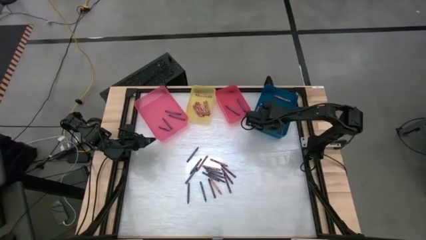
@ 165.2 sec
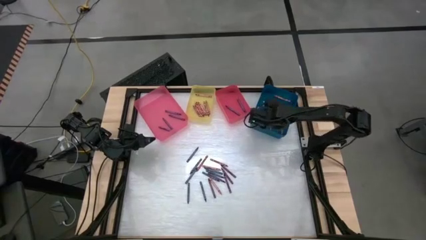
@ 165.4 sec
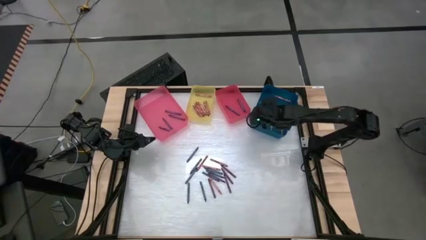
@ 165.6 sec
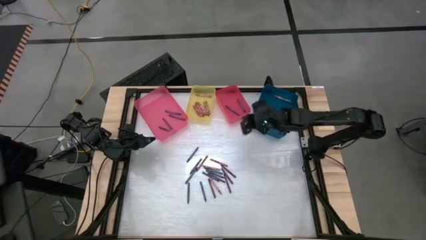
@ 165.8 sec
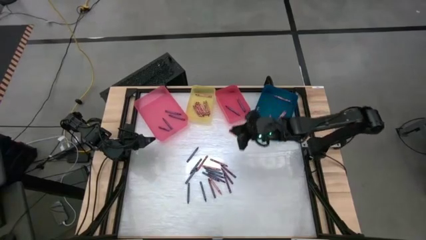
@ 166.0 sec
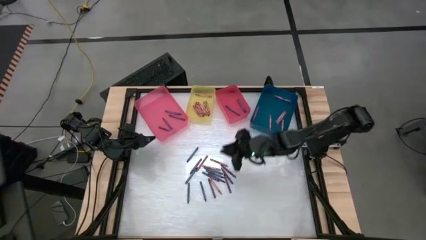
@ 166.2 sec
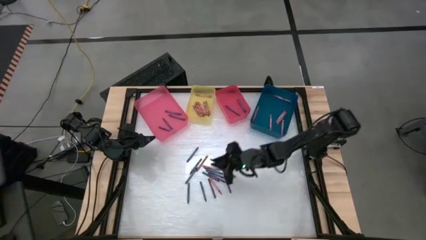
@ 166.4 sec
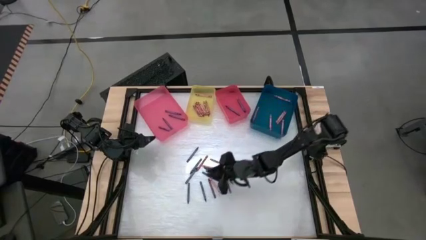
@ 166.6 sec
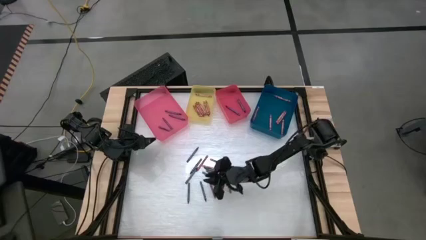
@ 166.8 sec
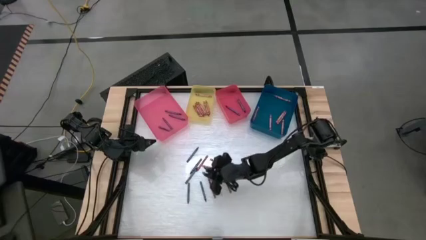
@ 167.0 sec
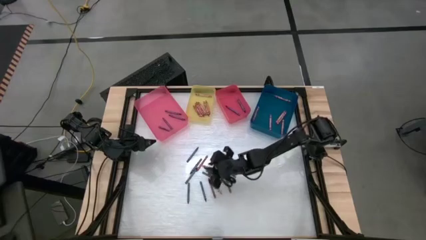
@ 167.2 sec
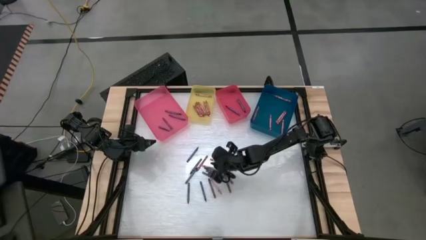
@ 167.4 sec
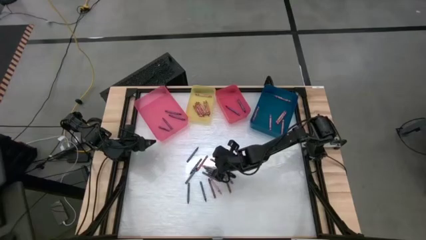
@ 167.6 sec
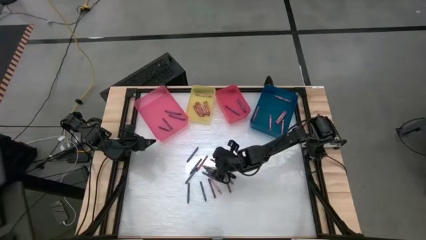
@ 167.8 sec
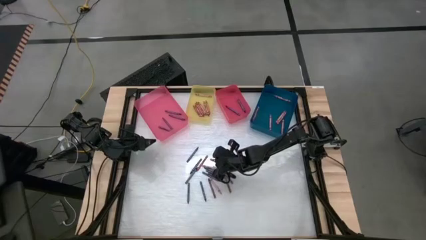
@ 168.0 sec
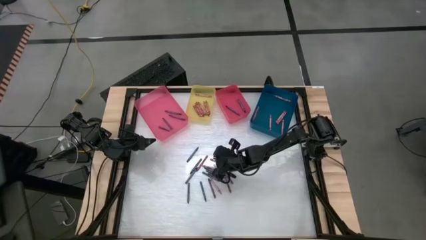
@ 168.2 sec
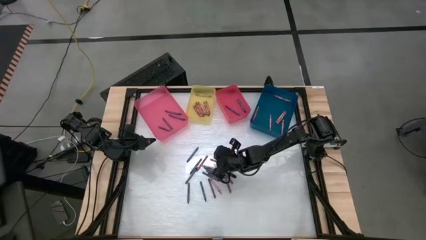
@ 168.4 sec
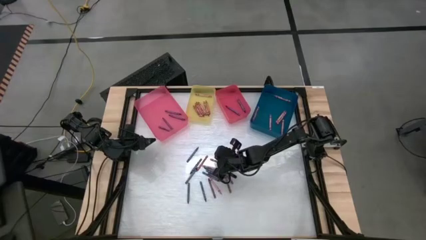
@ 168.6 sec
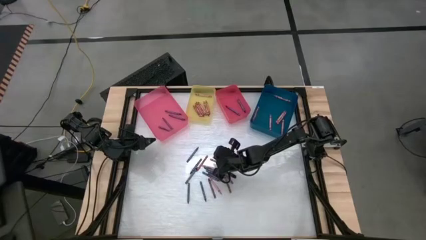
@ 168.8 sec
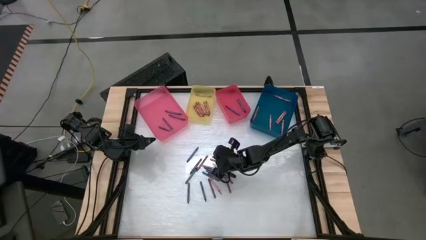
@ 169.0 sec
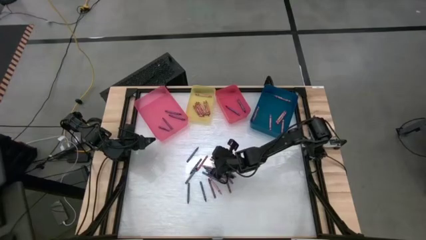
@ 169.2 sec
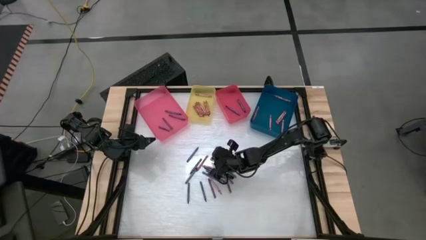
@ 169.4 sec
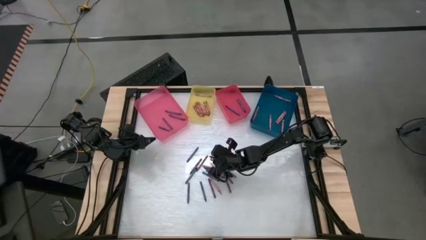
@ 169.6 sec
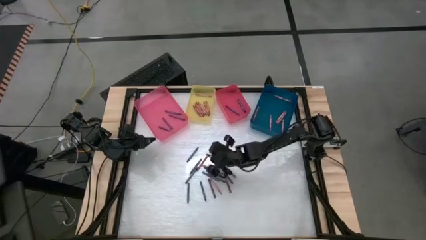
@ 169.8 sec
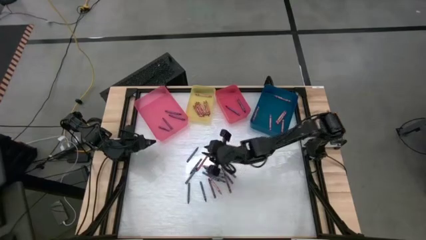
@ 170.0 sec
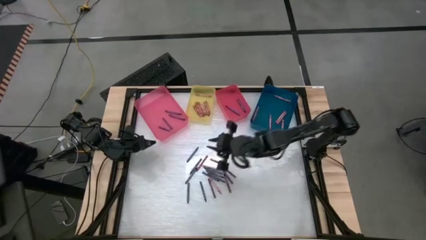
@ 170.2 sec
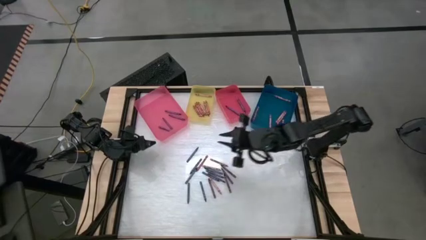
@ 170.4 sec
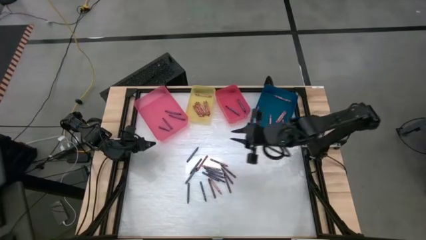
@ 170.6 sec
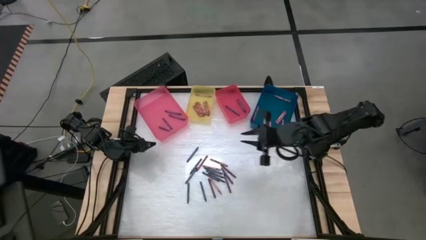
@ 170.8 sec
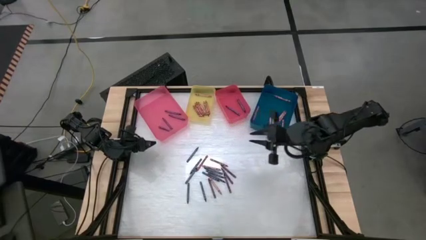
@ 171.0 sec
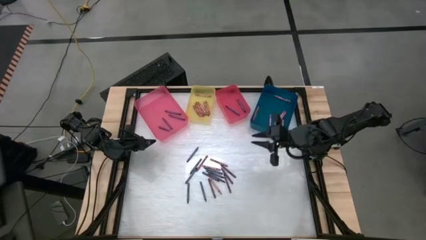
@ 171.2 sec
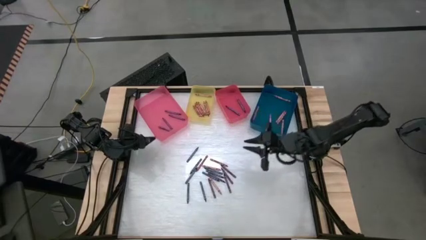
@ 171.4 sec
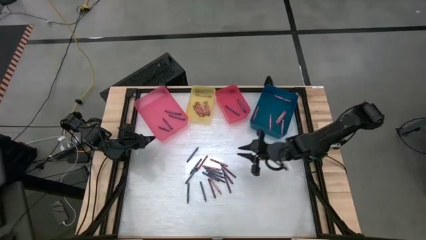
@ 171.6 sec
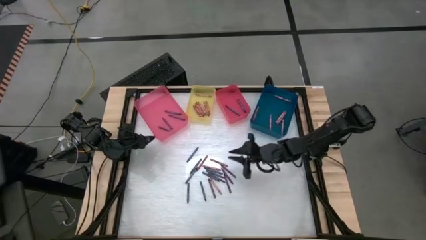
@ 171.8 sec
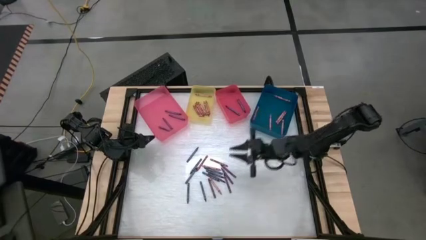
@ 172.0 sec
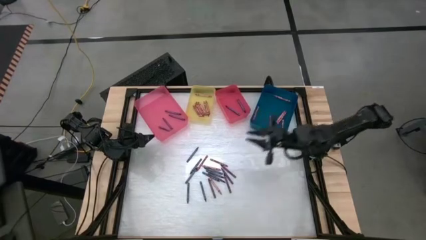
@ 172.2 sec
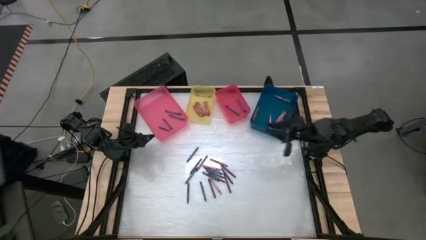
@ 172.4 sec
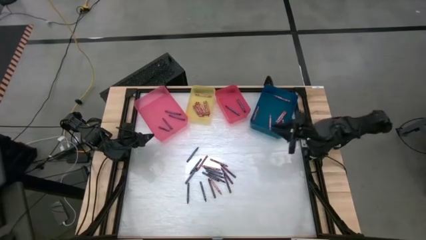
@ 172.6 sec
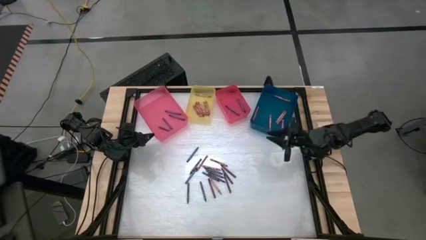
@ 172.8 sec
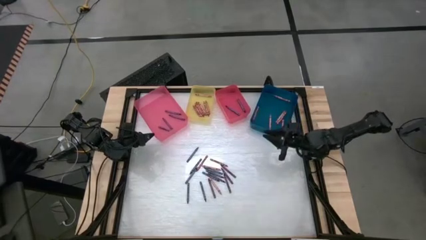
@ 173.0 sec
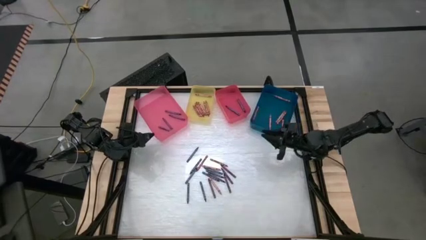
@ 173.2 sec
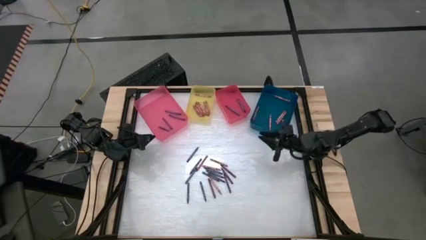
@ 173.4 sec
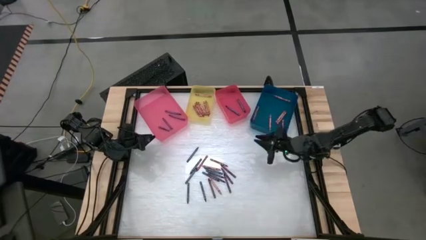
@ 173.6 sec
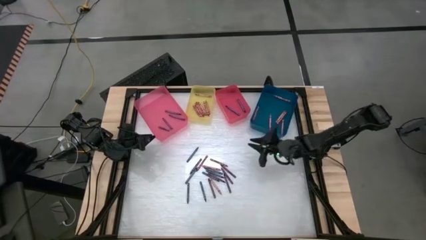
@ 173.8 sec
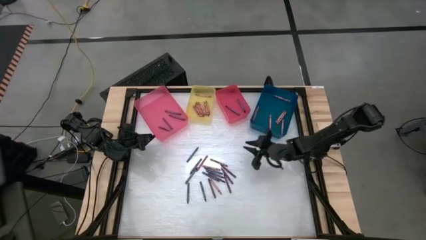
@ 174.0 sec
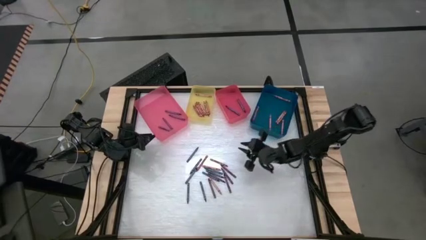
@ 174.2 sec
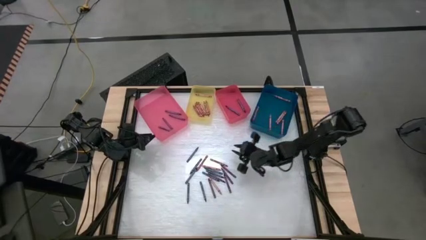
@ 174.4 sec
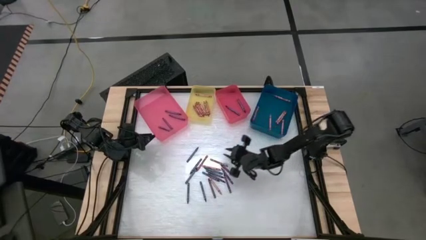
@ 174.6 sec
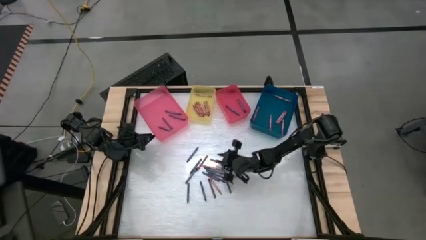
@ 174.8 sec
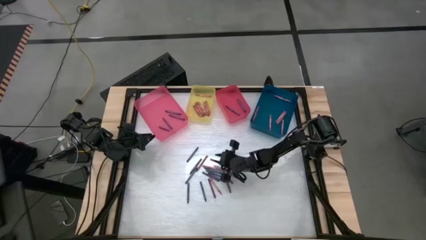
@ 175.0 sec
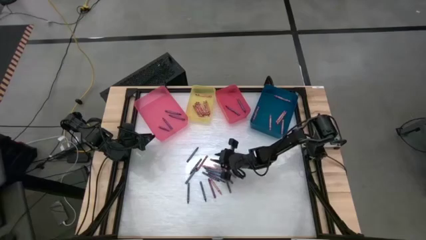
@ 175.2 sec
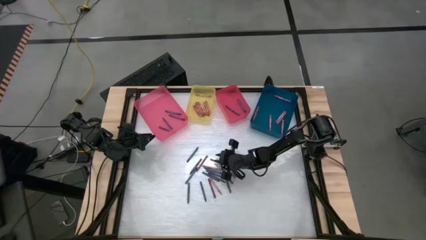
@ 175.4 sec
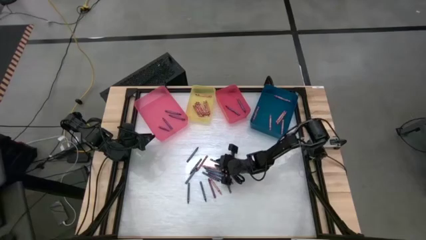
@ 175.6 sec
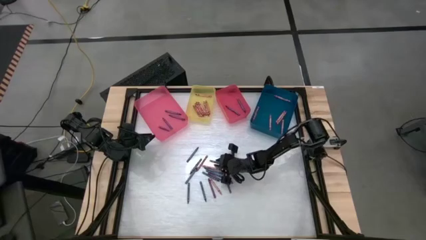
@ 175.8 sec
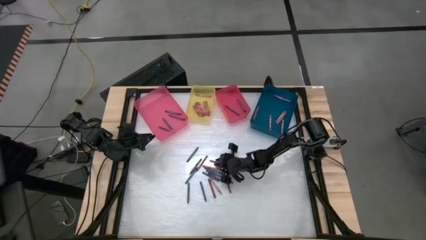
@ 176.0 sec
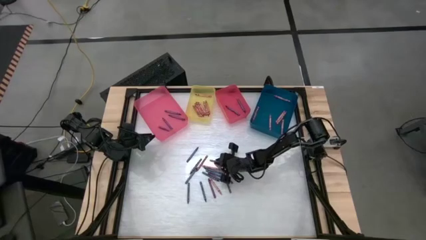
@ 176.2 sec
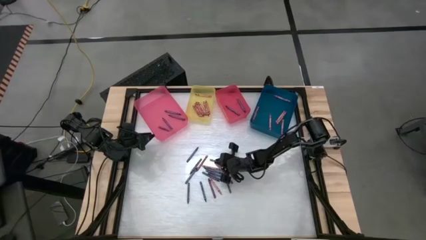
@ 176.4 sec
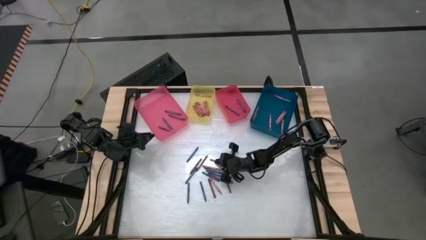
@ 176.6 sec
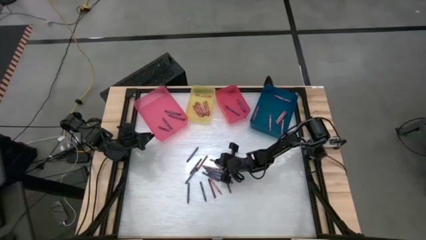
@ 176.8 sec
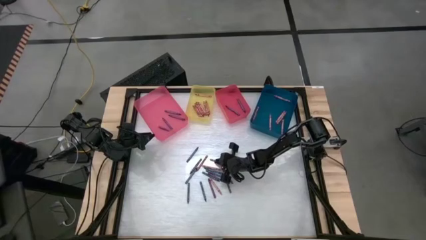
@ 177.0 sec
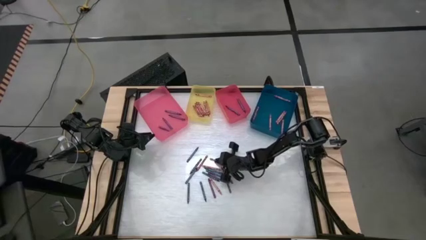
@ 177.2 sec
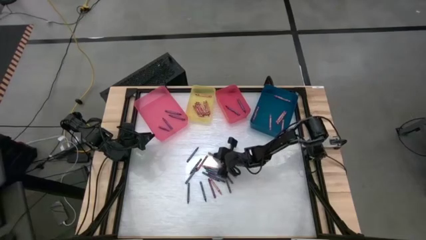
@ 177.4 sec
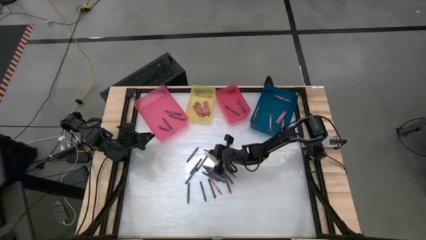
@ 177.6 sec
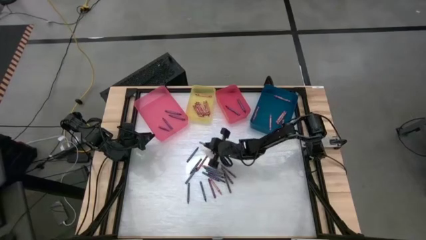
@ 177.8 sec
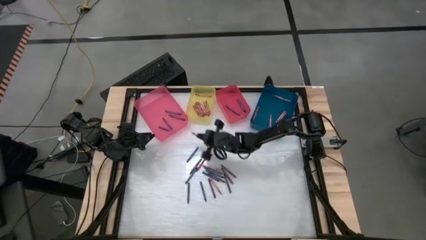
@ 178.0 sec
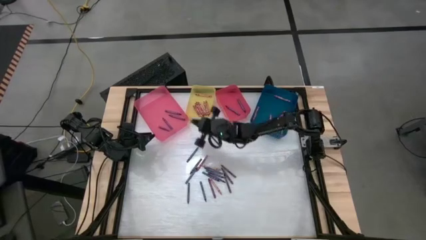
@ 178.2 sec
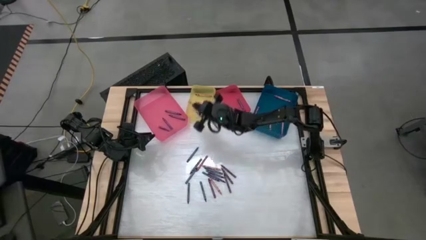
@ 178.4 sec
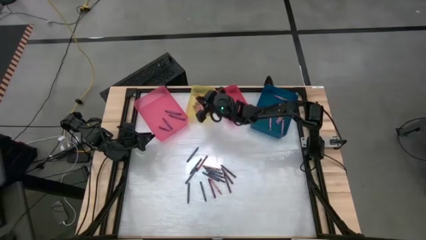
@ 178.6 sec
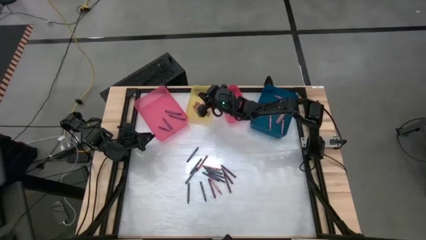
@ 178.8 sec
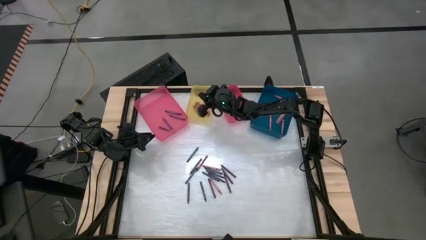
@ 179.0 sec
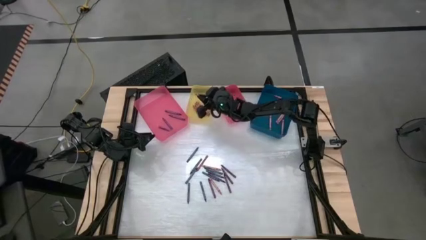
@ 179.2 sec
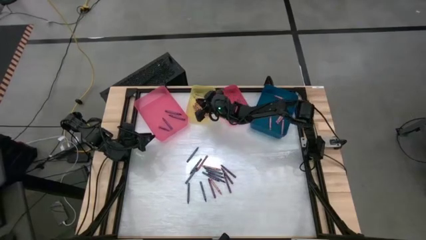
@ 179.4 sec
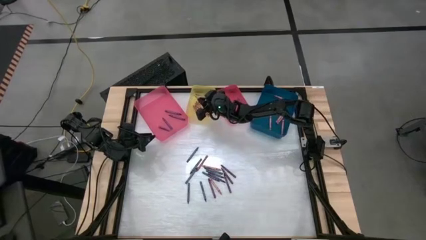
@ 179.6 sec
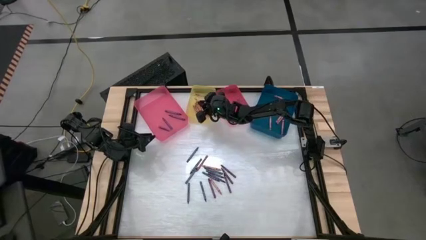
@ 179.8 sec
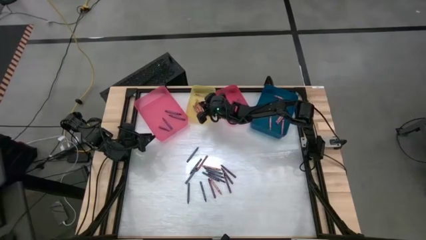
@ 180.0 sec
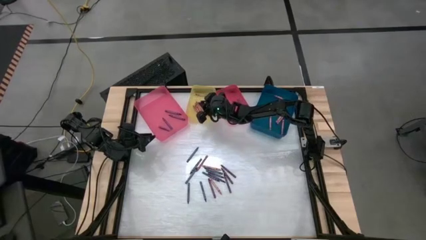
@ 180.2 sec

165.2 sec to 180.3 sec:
Task: Sort crayons
Put the red crayon into the yellow bin
